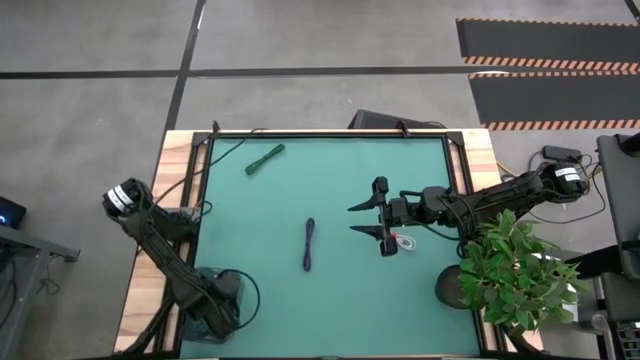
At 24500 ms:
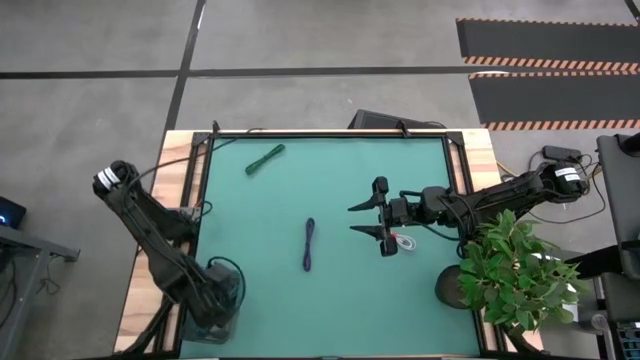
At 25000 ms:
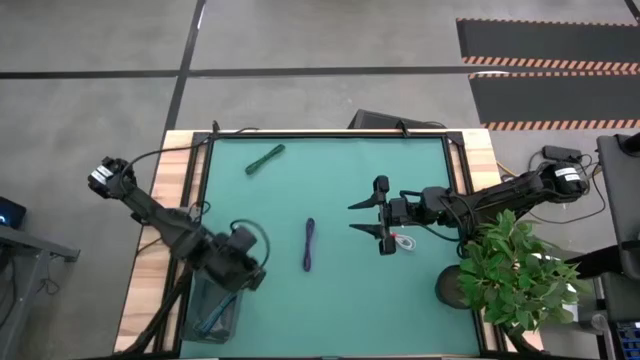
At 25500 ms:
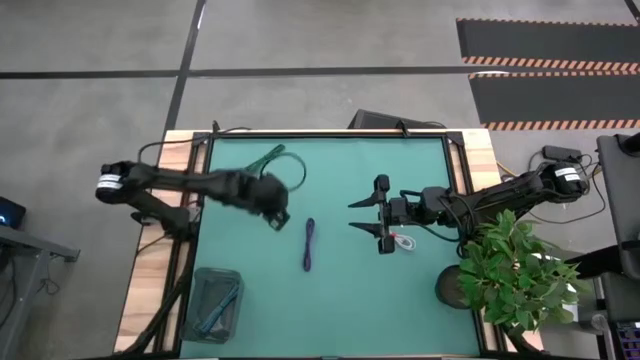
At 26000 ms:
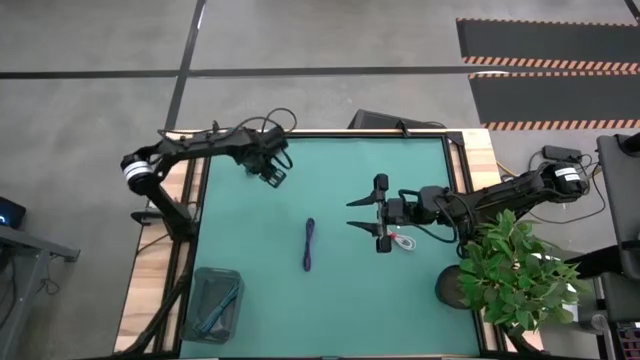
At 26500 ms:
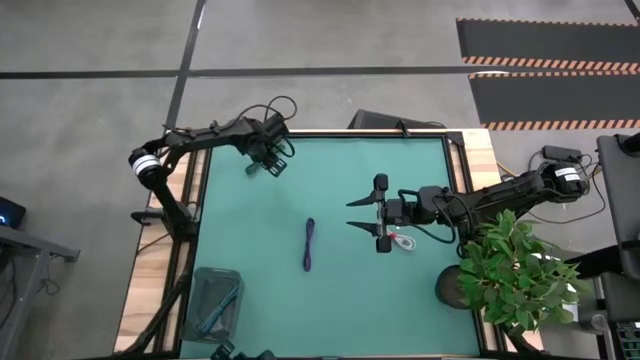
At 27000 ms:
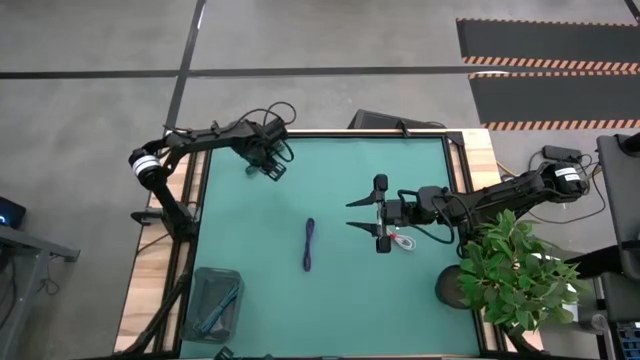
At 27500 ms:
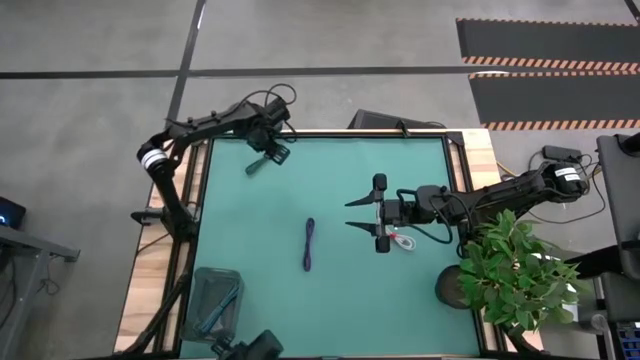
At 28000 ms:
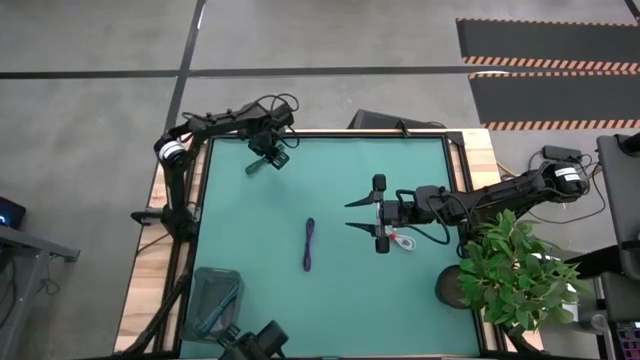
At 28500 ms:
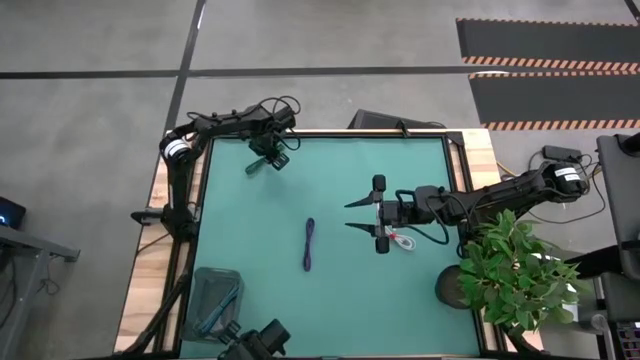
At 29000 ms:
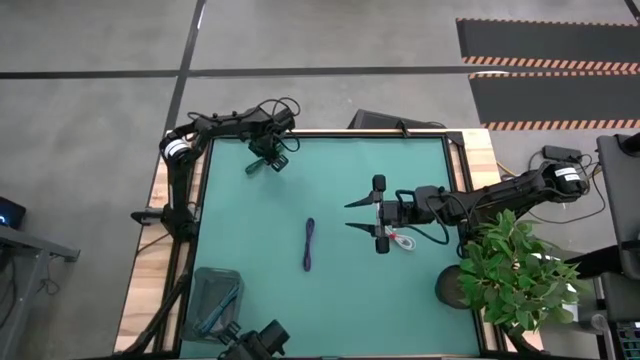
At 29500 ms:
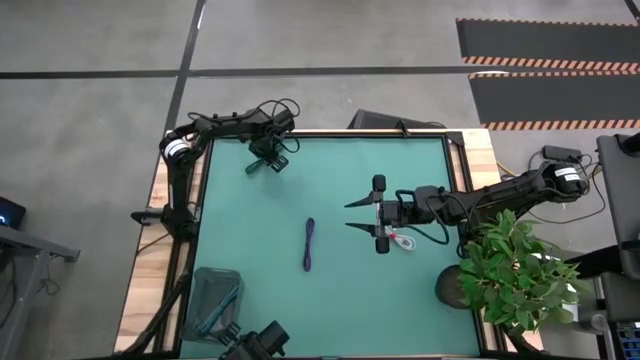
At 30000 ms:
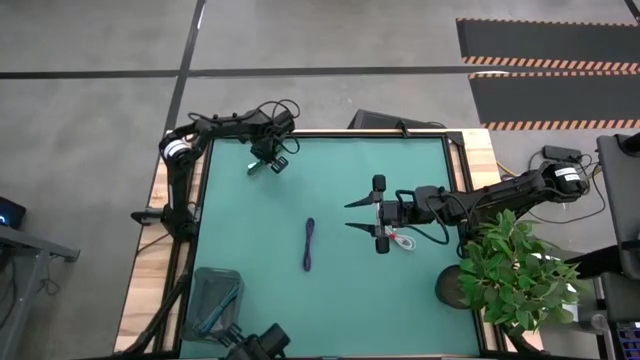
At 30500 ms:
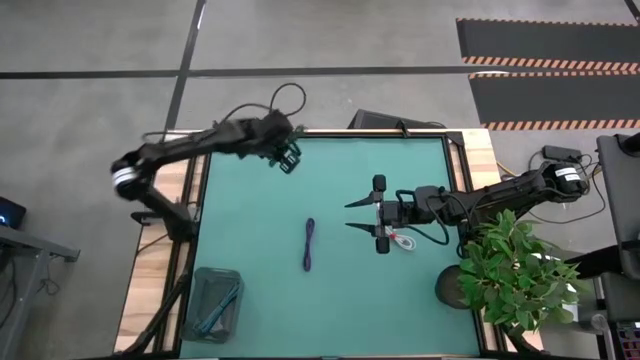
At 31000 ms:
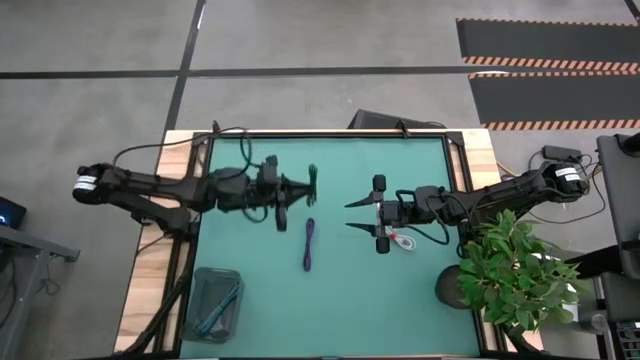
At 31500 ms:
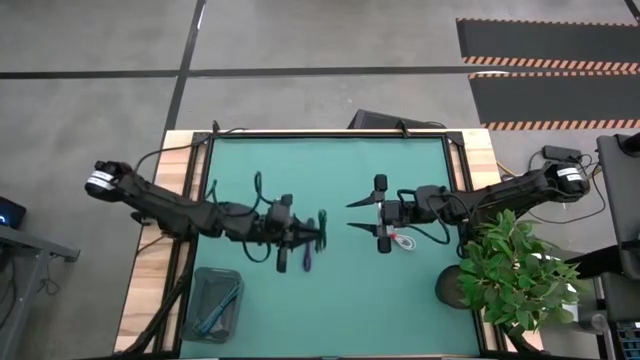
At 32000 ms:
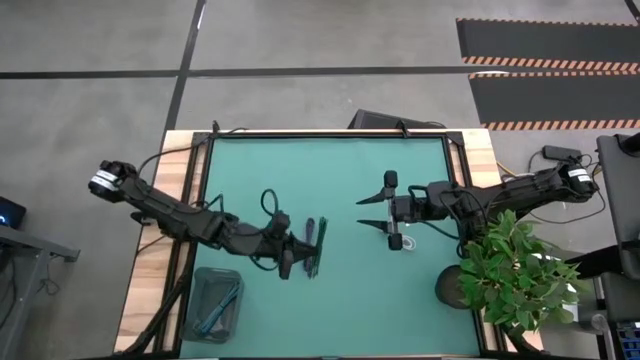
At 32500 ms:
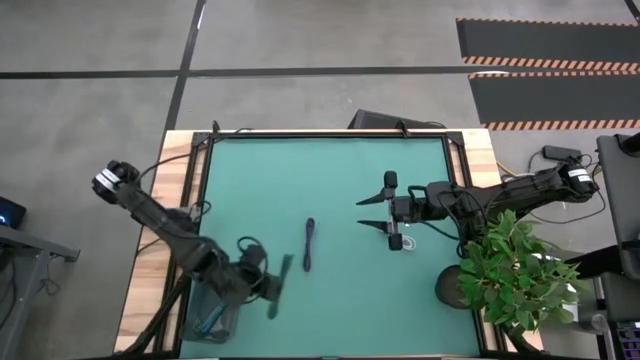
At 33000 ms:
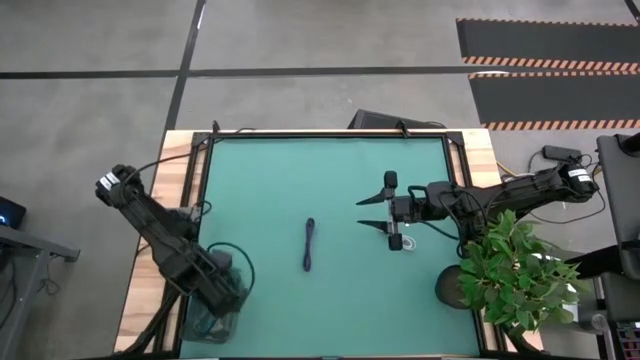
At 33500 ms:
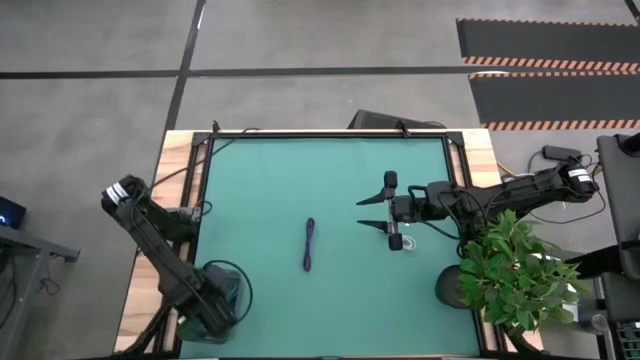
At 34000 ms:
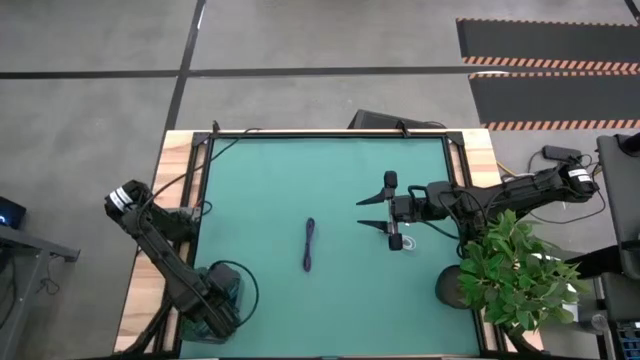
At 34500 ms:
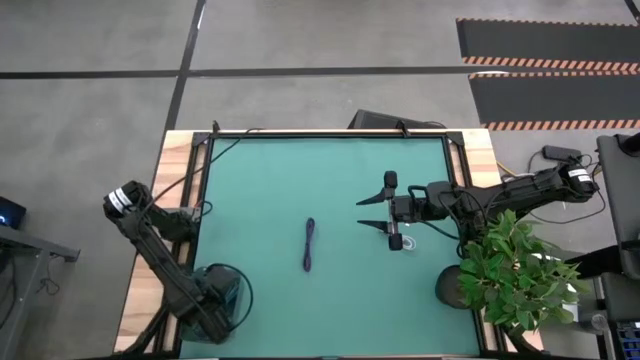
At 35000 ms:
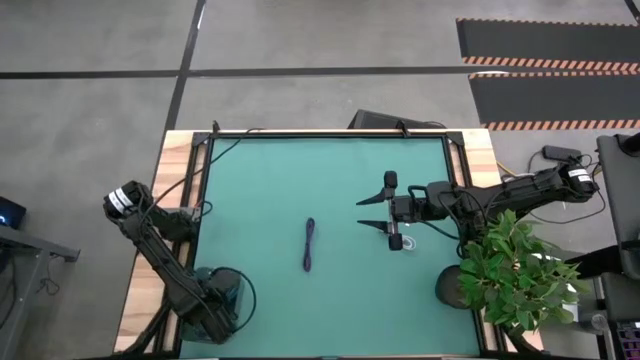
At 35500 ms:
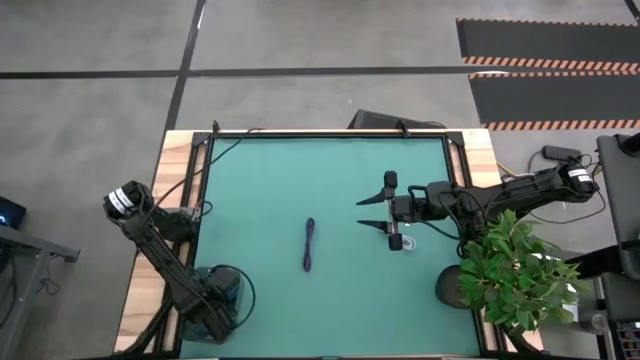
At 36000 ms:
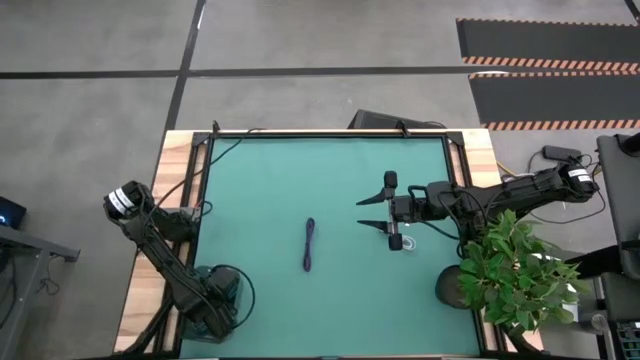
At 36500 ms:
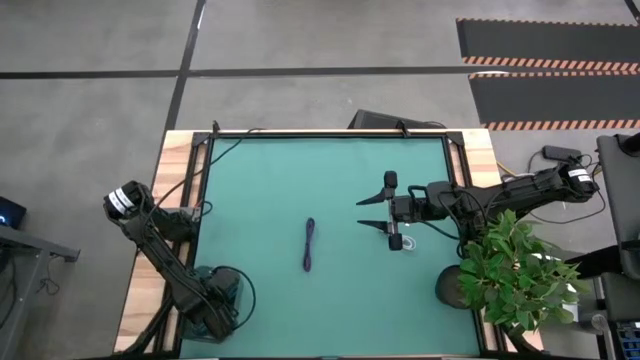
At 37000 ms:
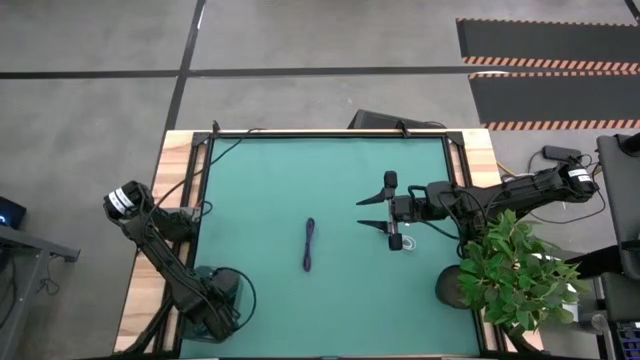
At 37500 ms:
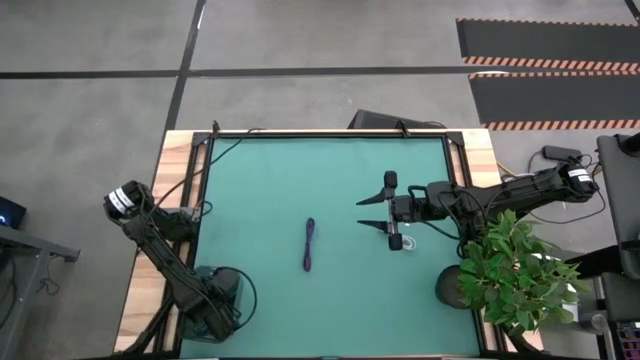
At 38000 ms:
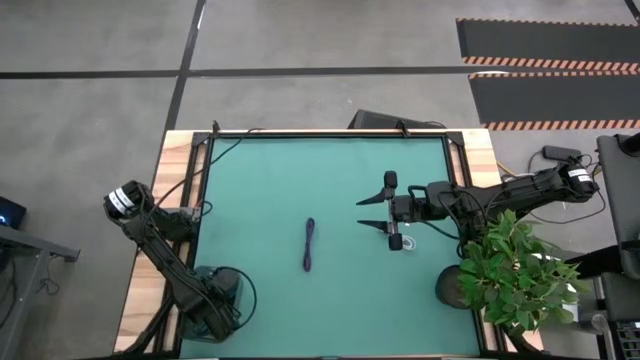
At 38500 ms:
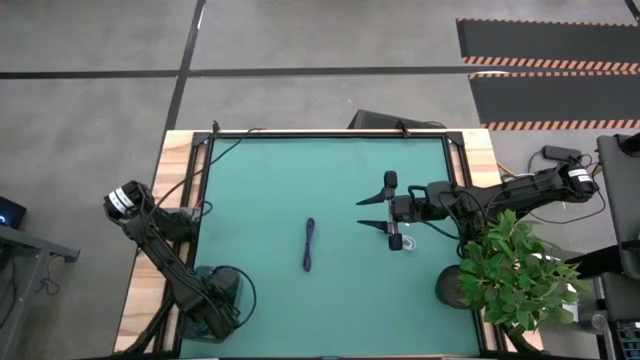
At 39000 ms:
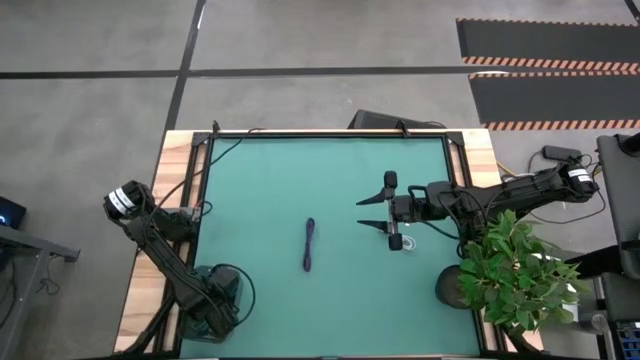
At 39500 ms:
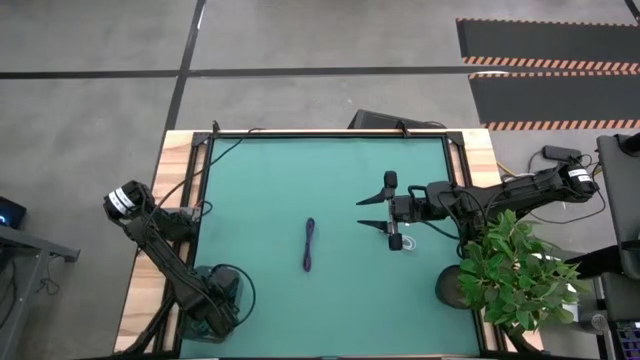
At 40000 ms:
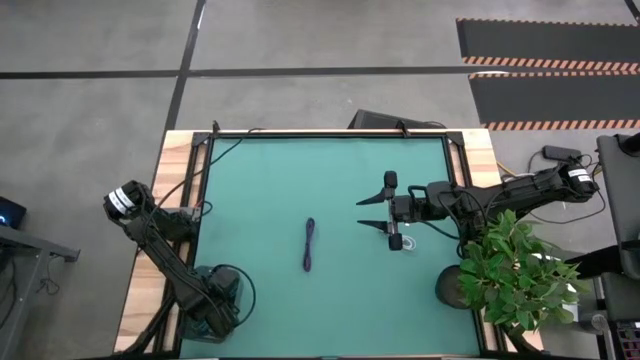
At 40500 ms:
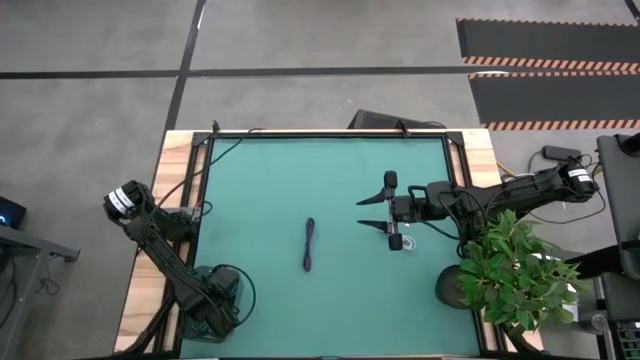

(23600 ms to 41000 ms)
Task: Pick and place USB-C Cables
Put the green charger cable into the gray bin
